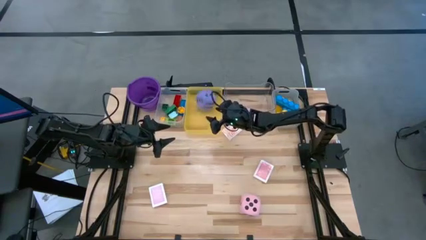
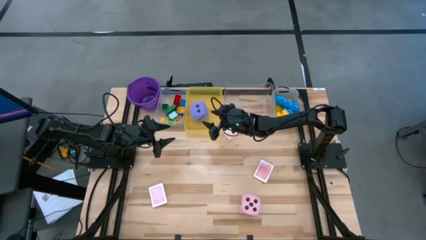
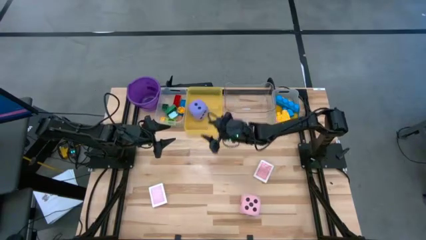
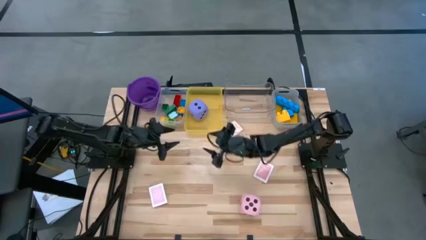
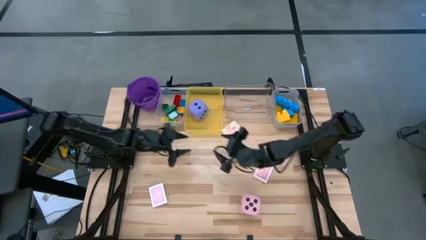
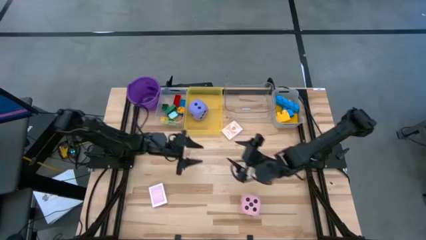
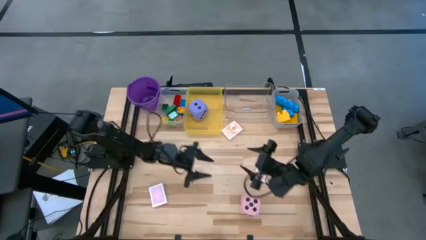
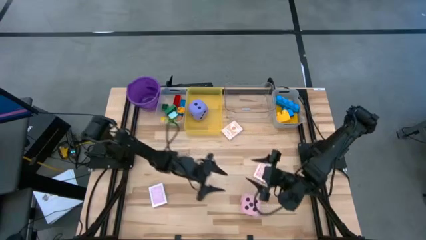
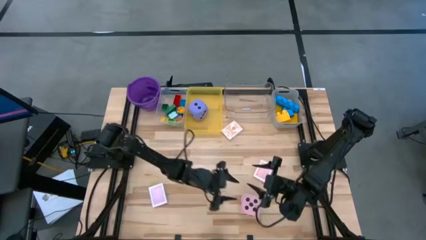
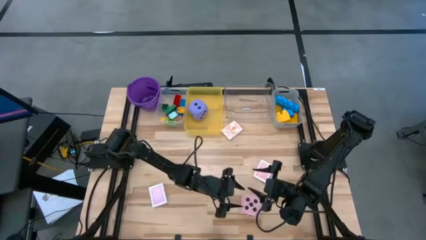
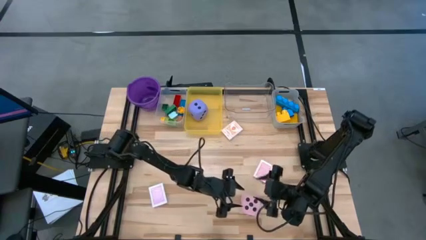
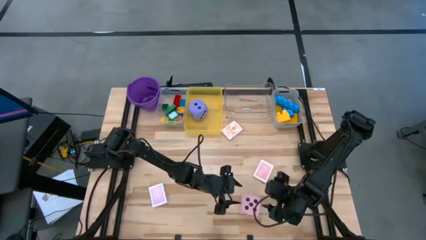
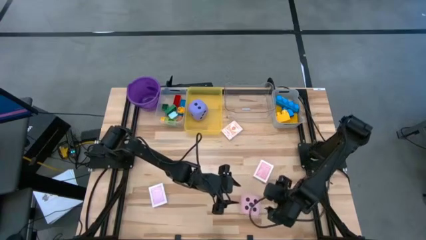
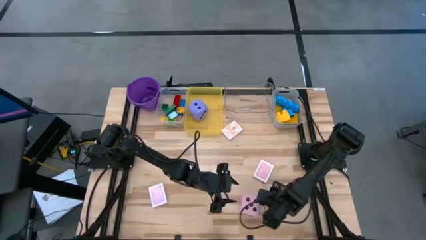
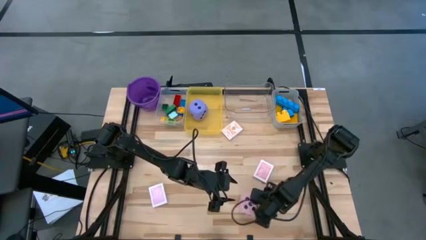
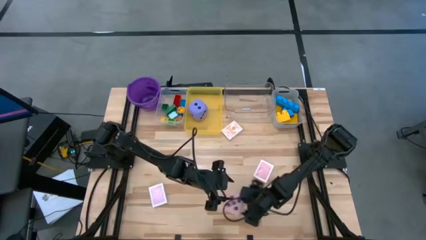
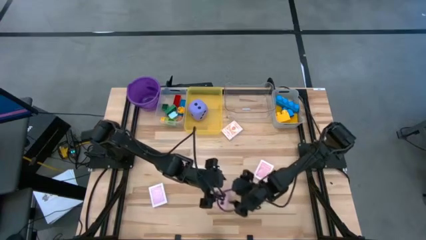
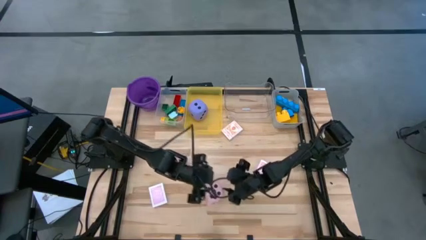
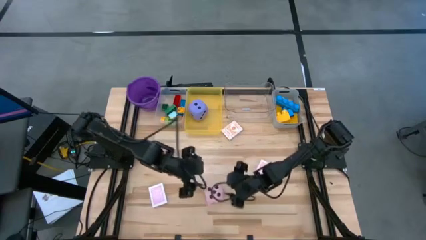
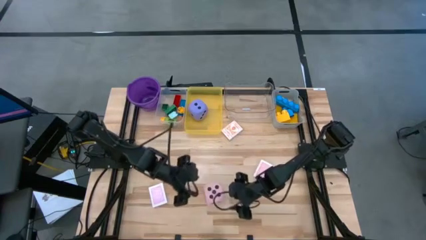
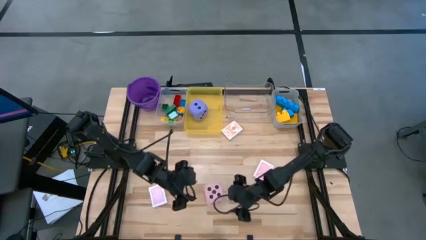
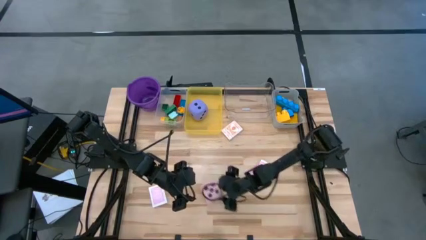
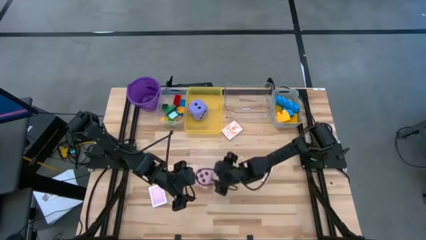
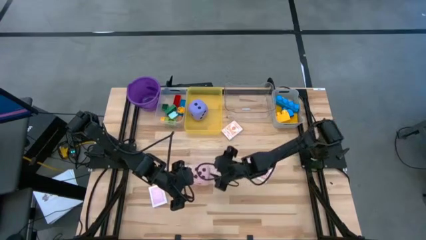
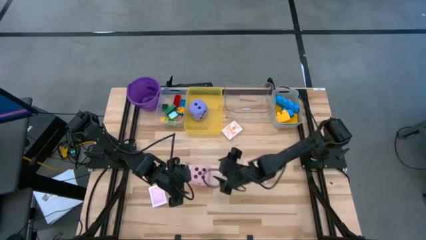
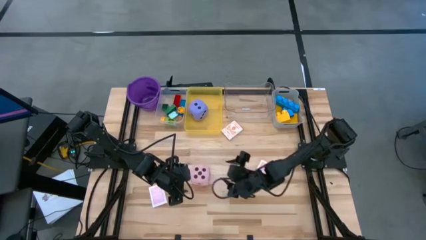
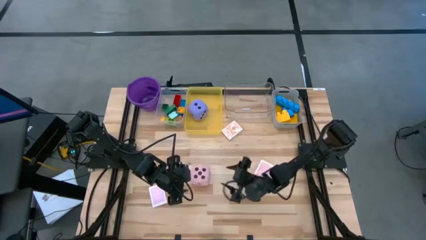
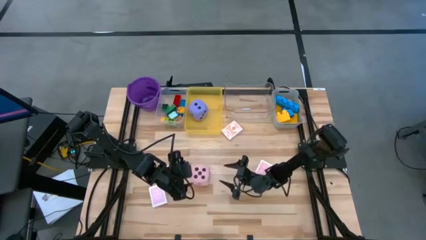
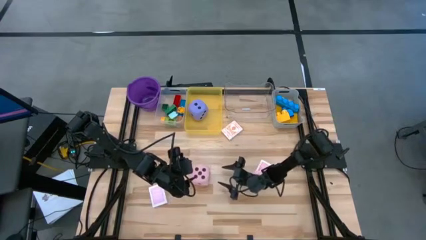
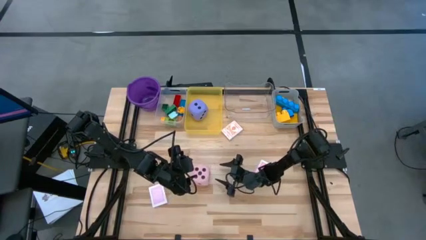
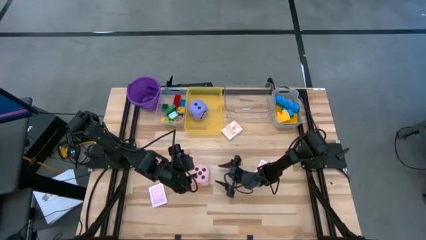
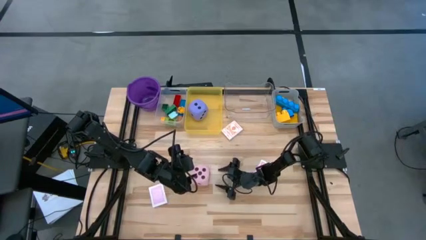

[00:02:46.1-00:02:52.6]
Task: Pick & Place Toys
Move the pink dice to the center of the table

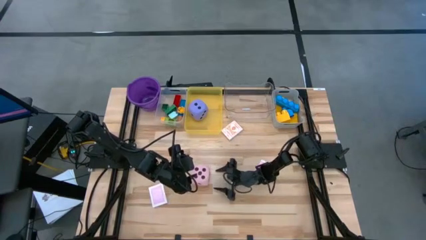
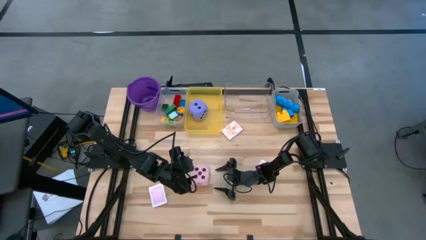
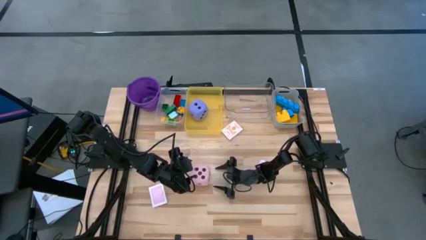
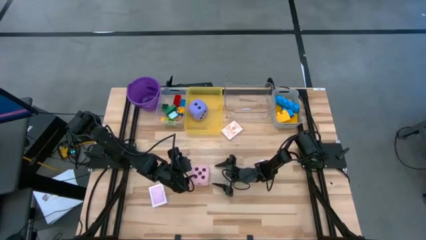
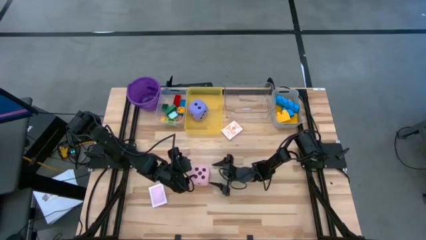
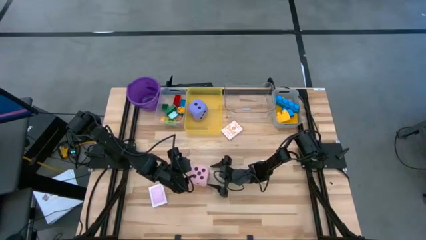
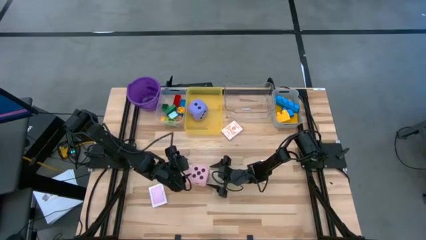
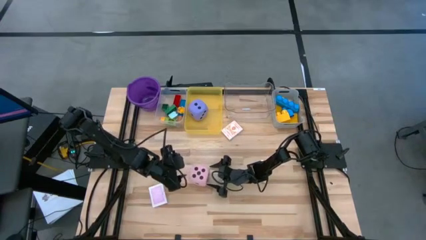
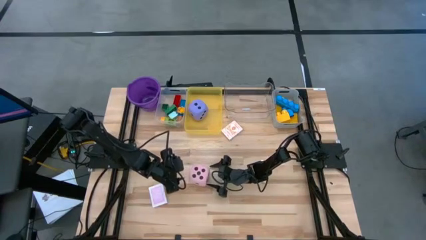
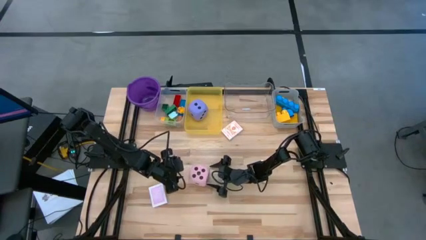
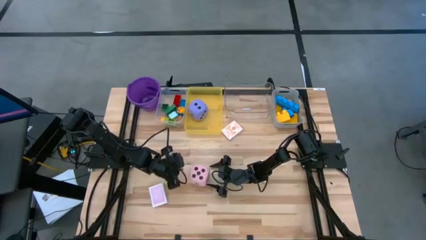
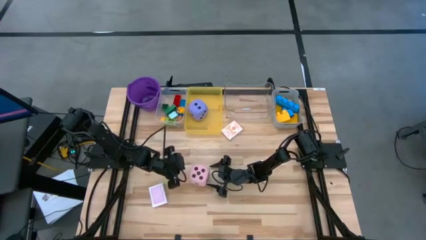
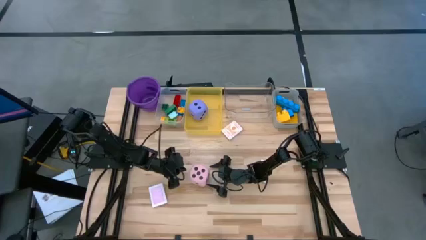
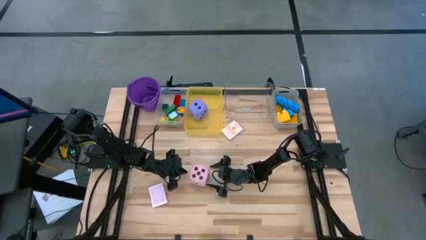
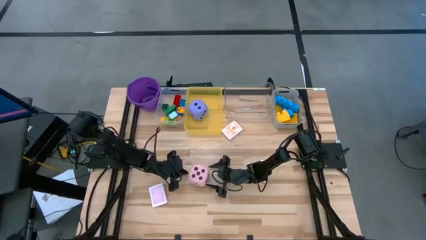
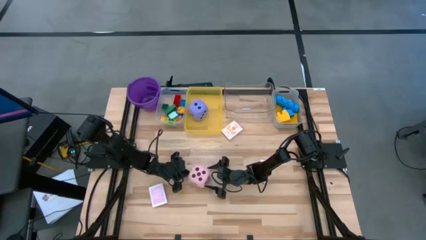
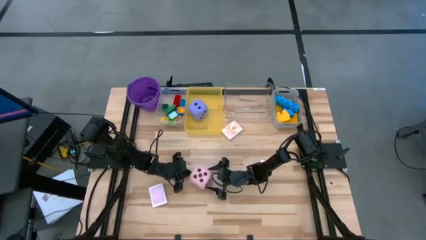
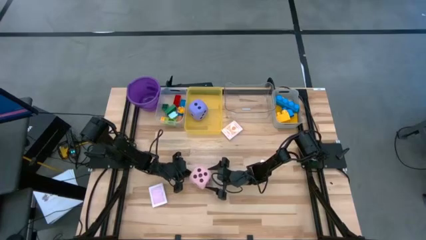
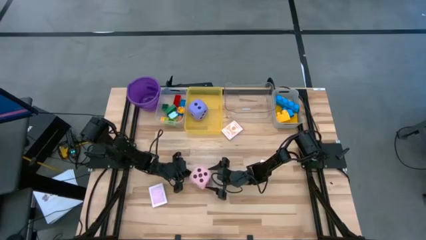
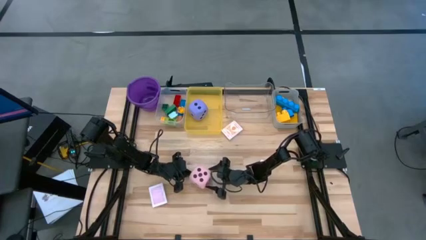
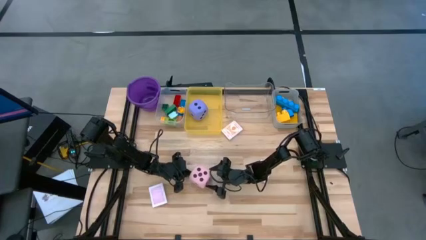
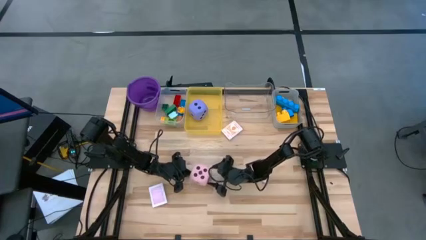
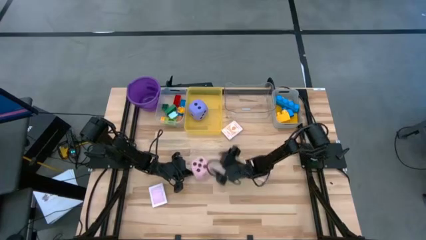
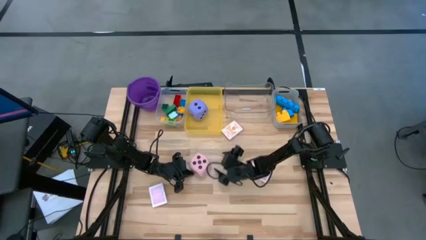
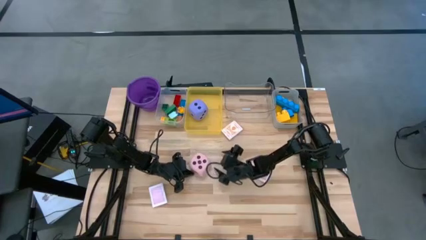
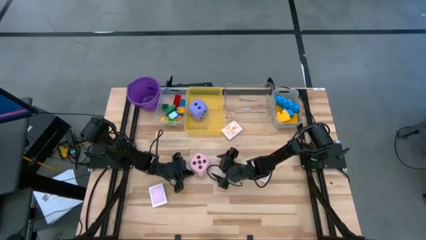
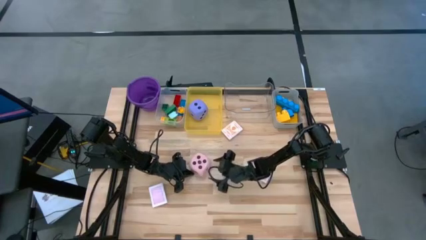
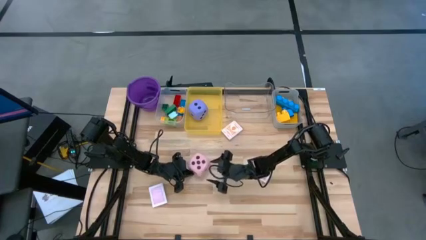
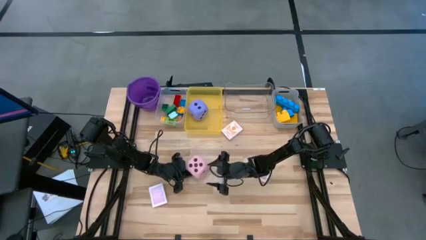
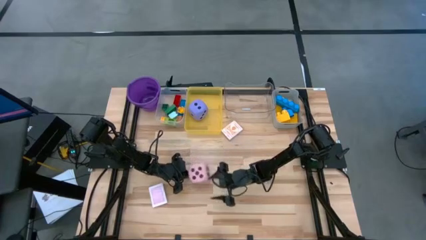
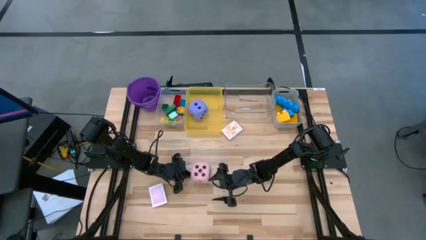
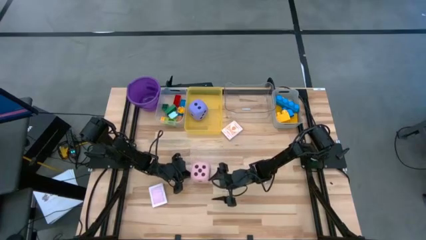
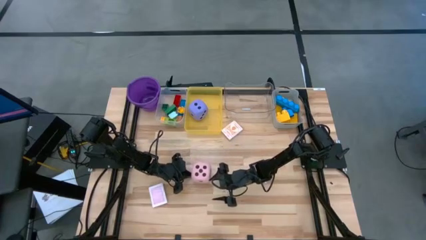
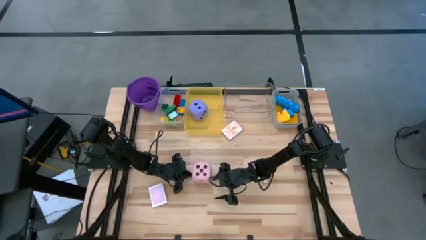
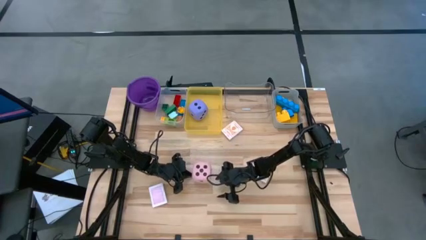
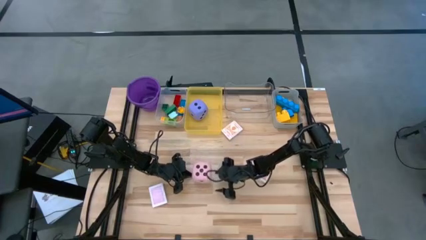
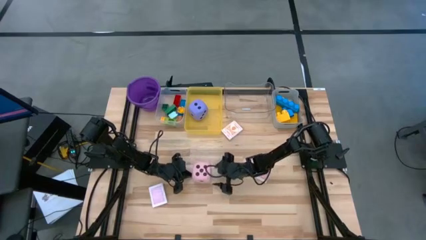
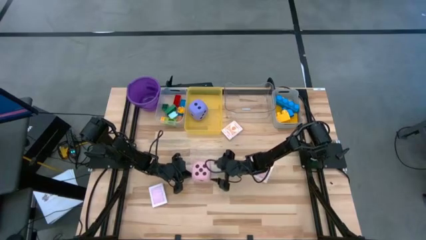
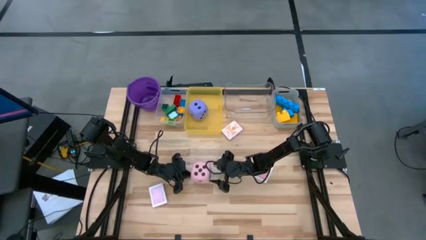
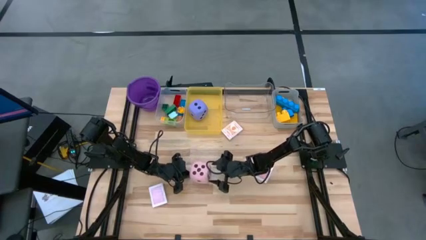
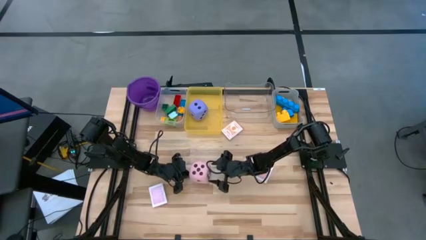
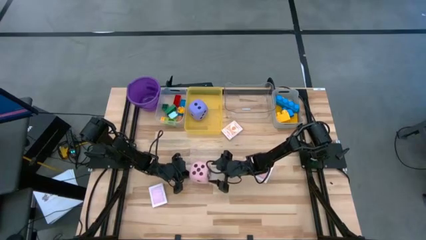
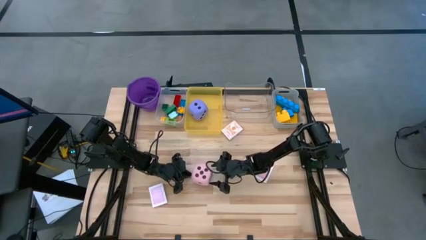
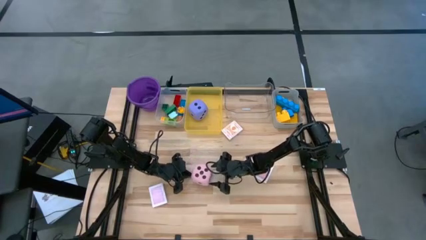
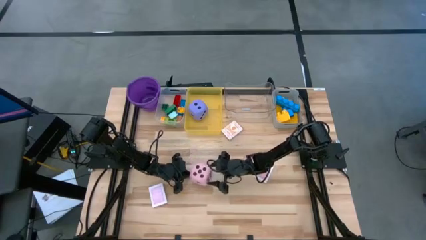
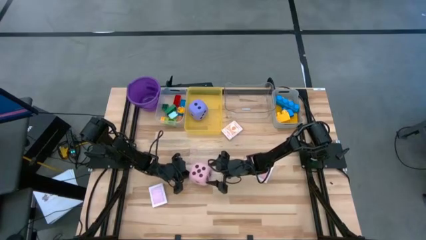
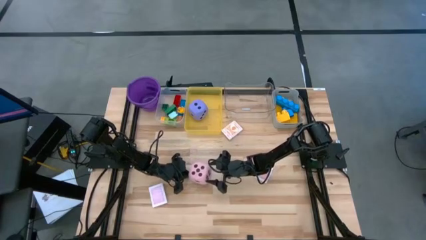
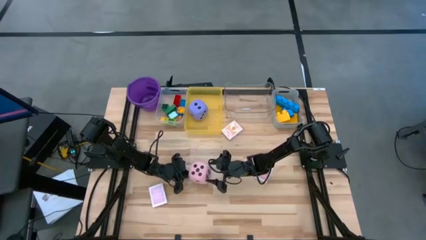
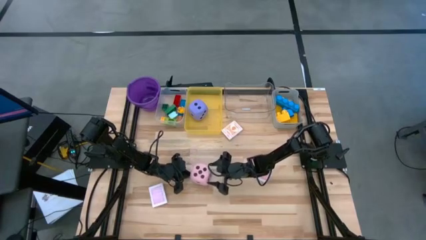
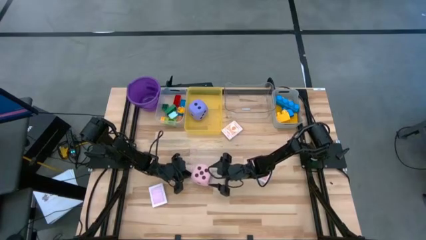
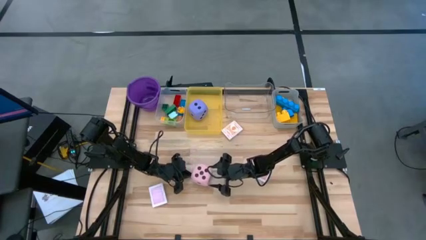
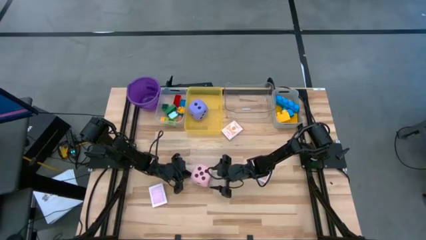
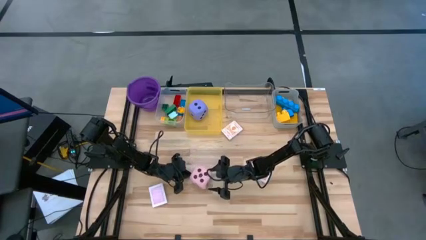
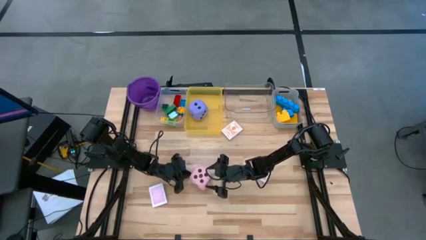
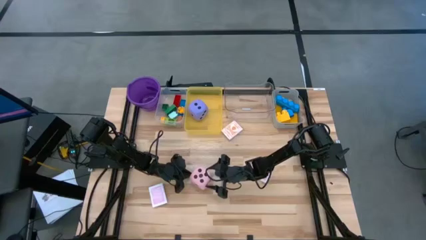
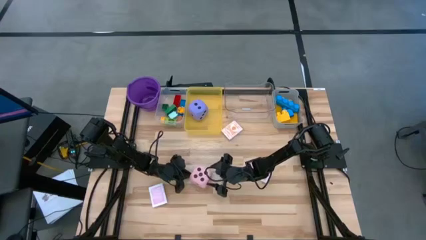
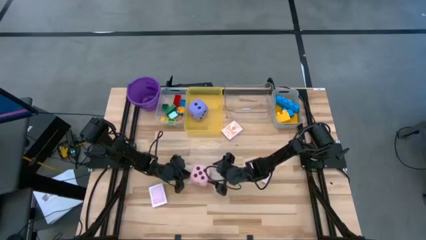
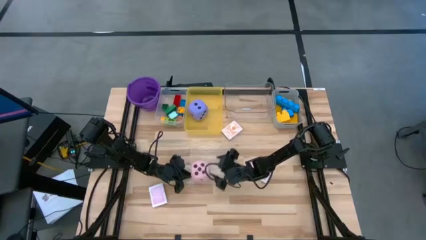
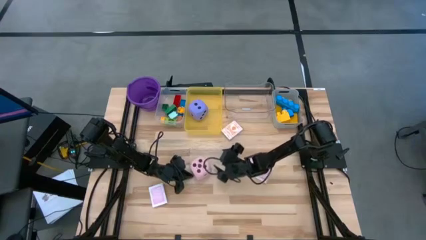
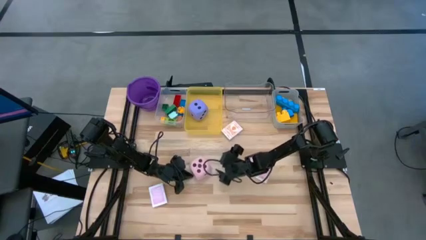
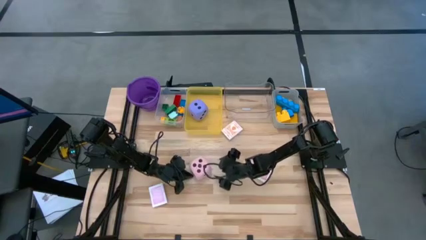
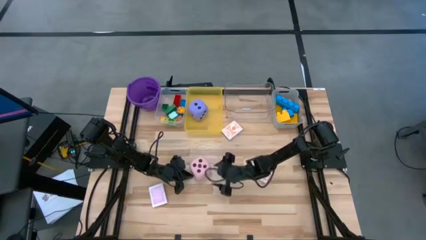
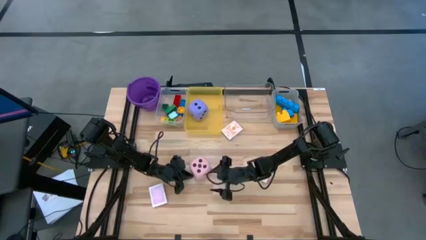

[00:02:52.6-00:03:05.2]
Put the large pink dice into the yellow bin
